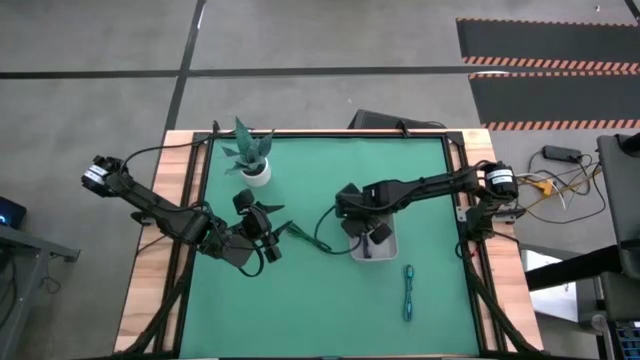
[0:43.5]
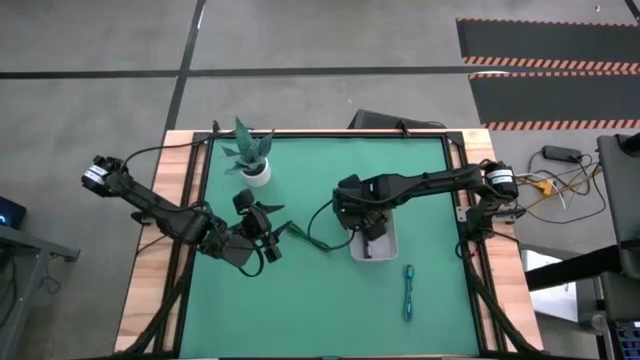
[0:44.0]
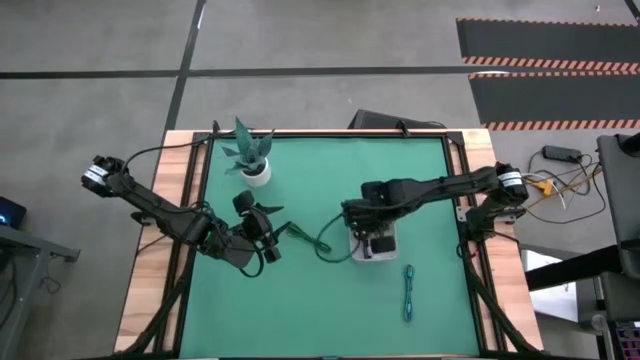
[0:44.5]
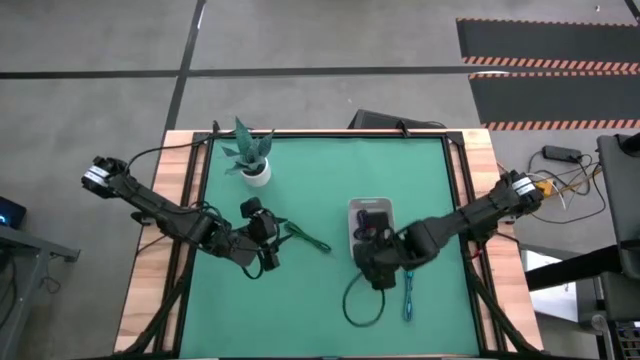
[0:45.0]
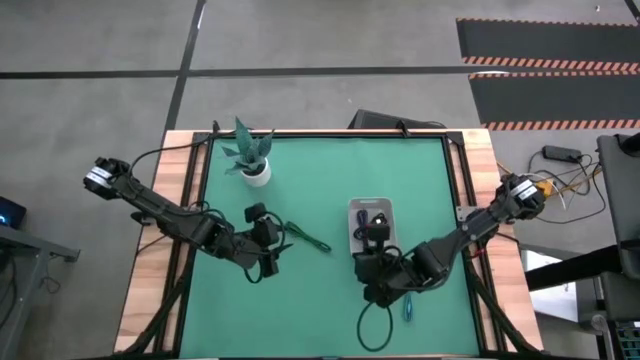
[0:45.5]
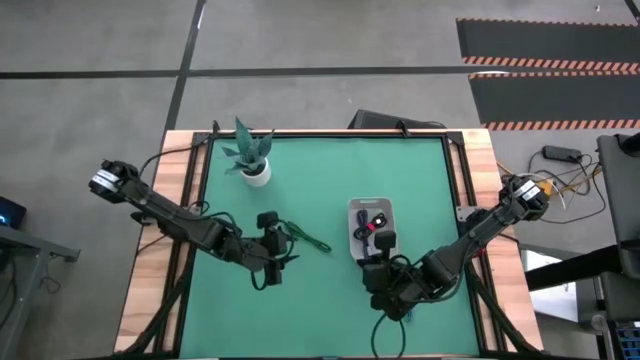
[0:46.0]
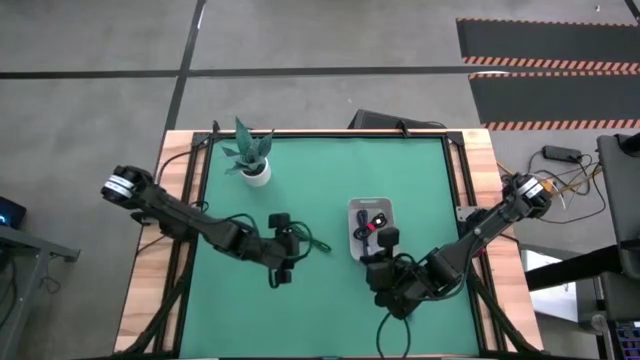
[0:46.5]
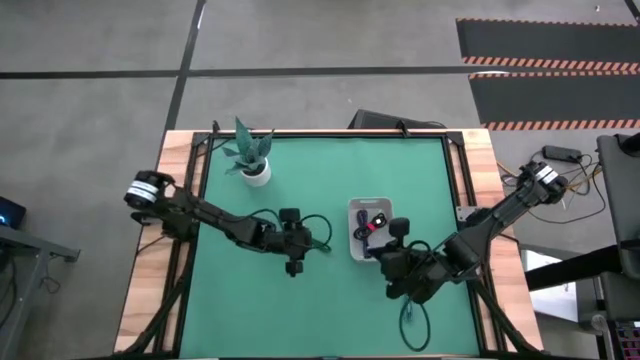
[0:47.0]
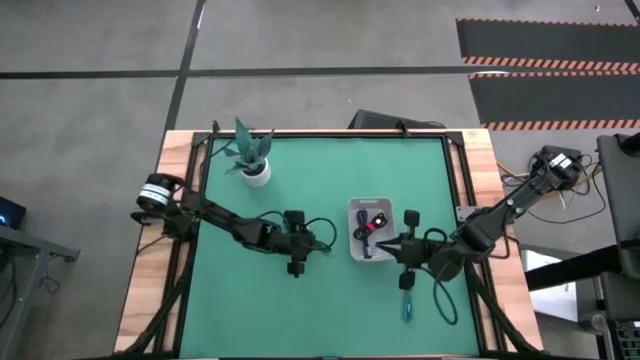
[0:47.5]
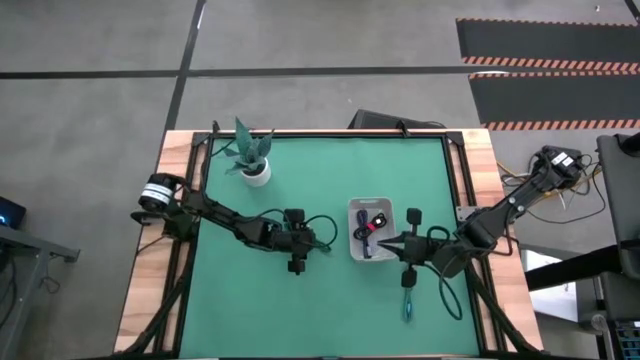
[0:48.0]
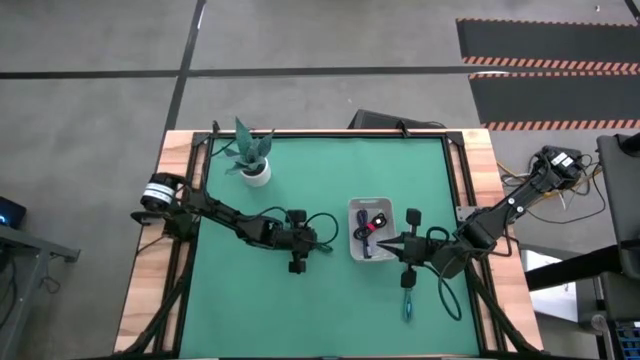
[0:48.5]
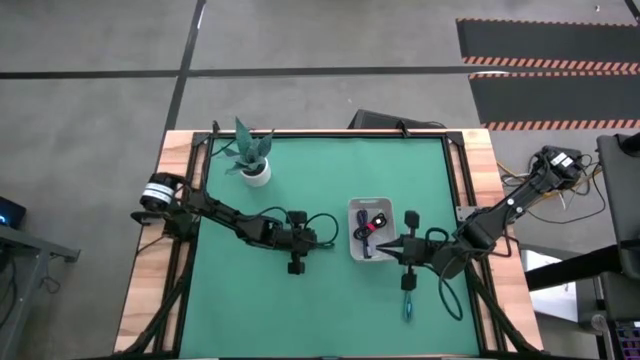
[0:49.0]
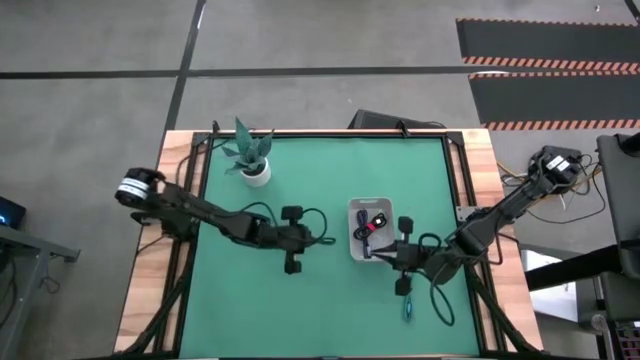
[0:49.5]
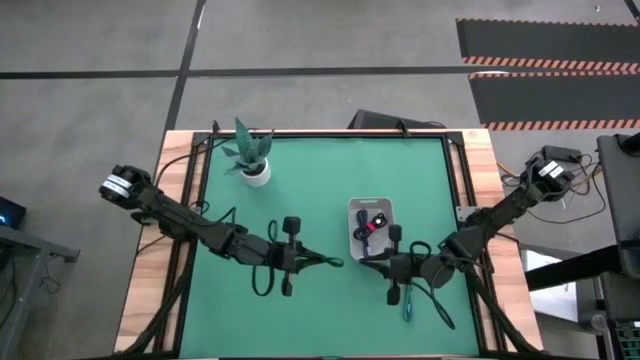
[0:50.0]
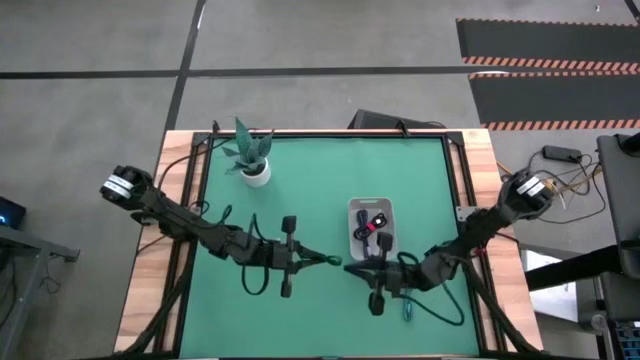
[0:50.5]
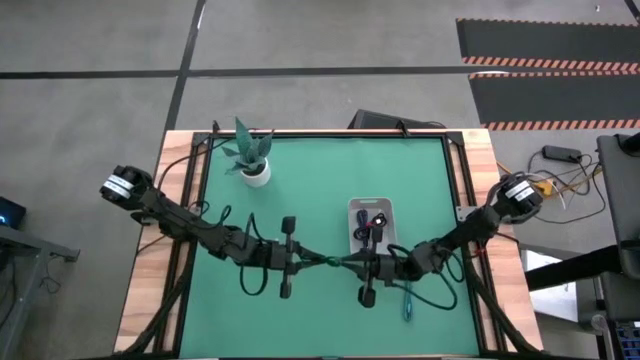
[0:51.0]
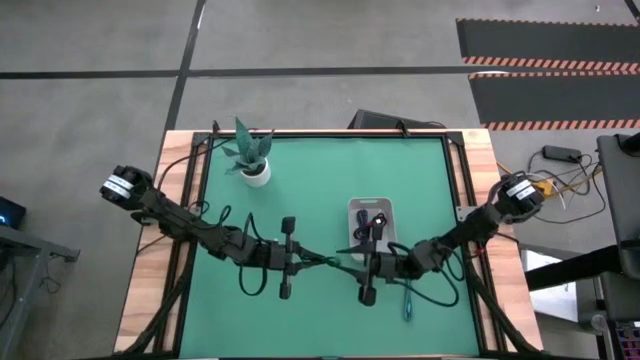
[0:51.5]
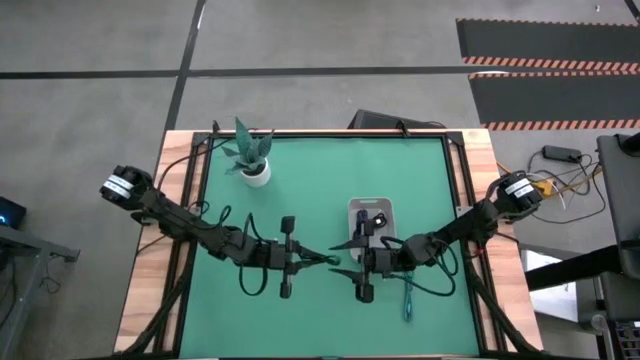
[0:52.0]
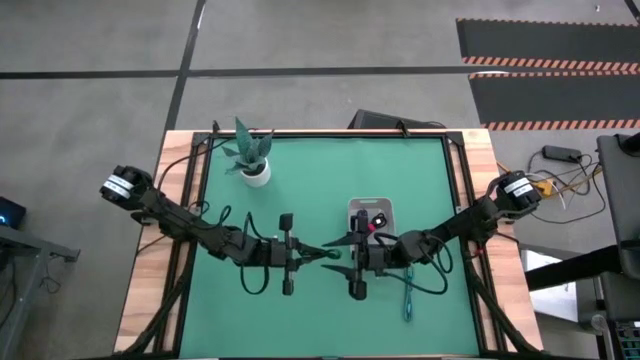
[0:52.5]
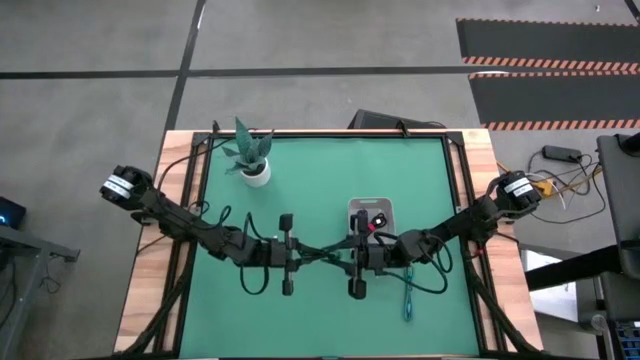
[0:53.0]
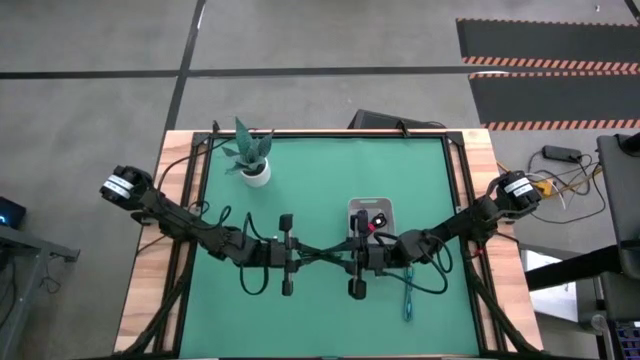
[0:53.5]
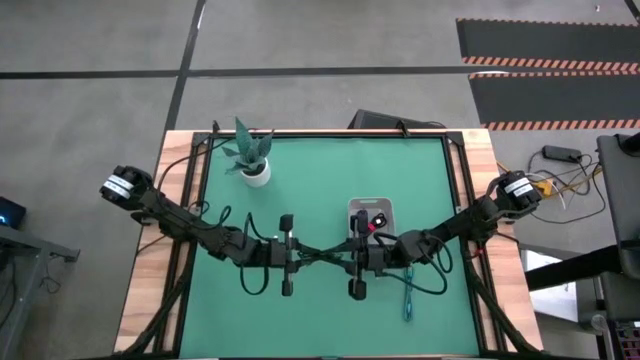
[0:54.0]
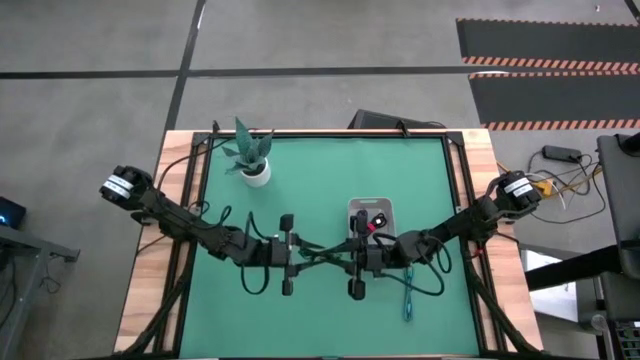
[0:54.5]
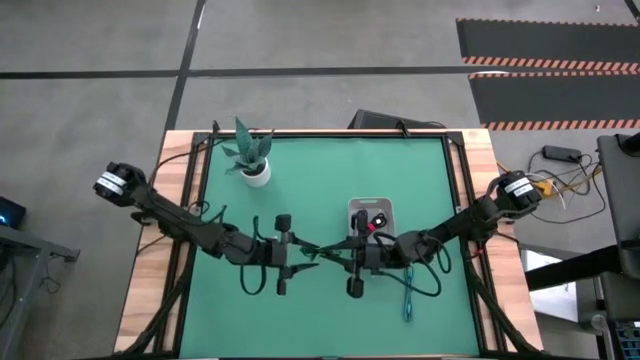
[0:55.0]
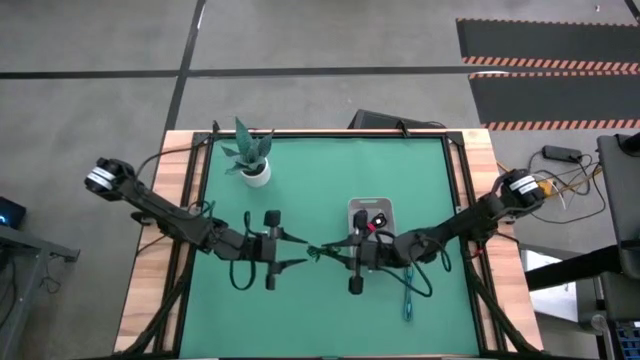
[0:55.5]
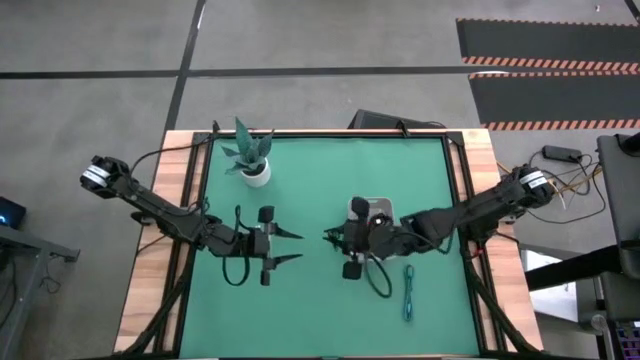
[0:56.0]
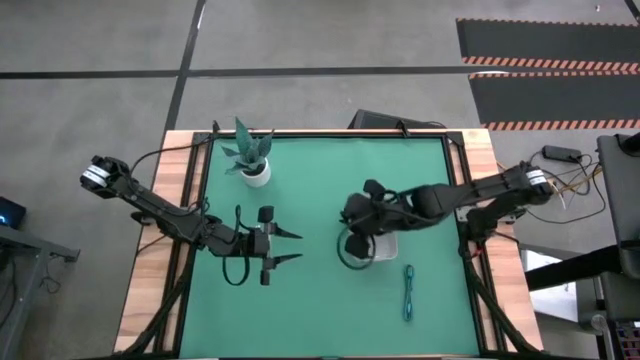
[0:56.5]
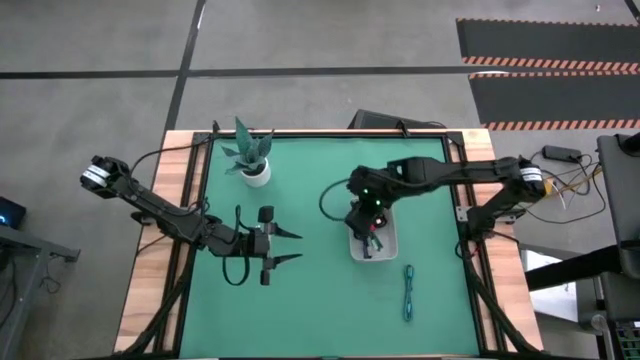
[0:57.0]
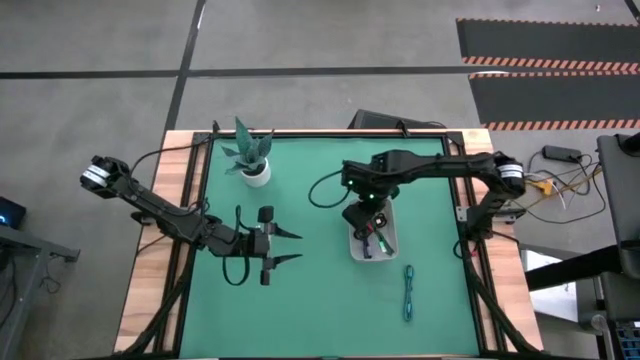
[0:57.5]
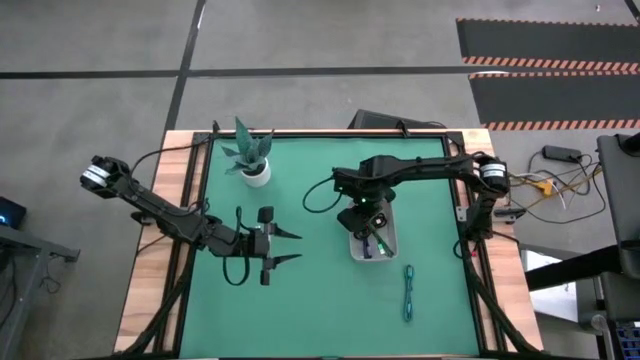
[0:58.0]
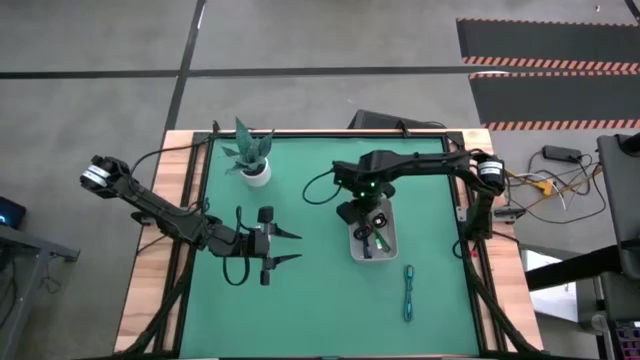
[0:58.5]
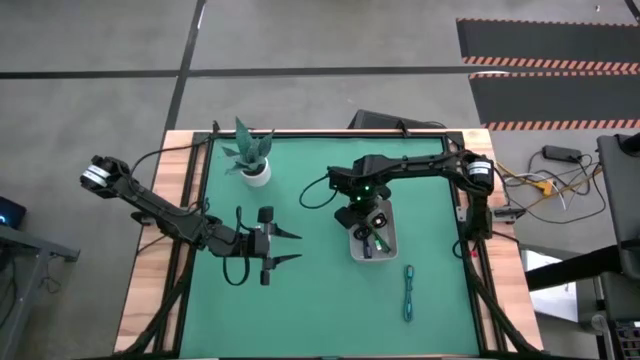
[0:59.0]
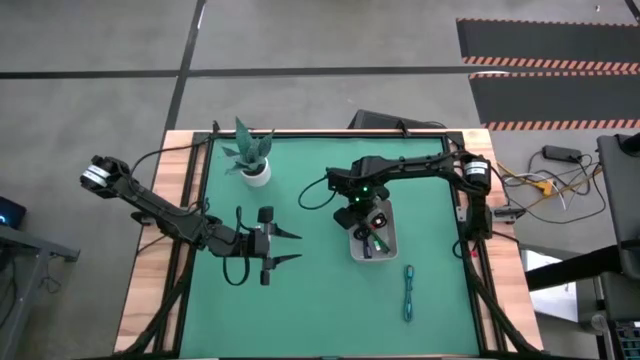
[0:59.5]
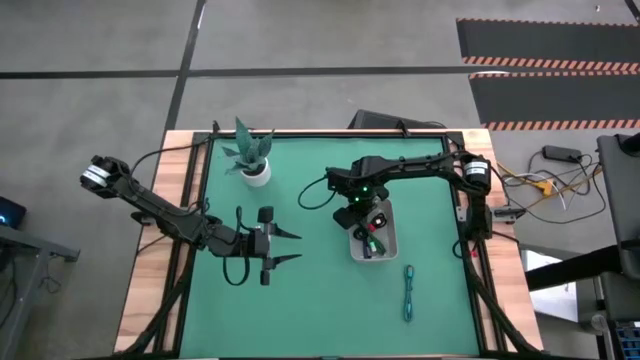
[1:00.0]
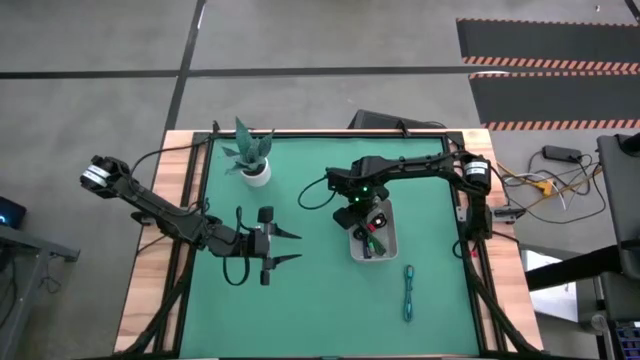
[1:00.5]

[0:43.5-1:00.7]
Task: Pick and place USB-C Cables
Put the green charger cable into the gray bin
